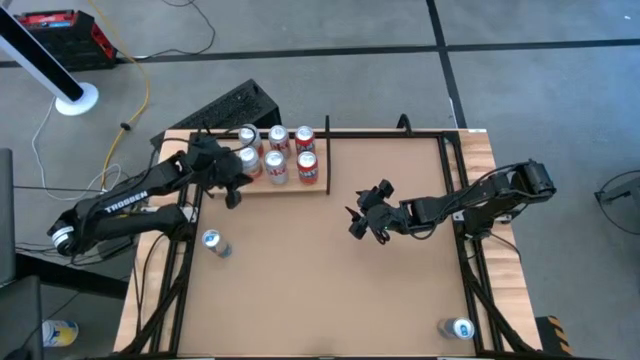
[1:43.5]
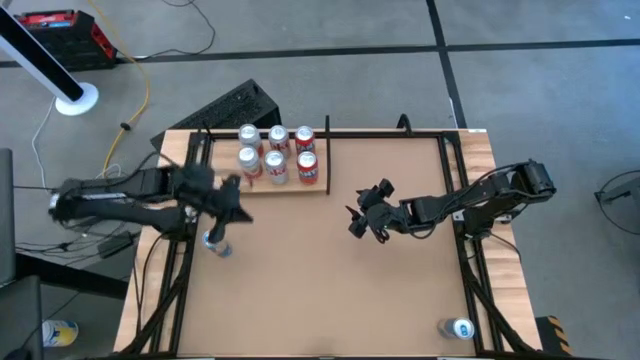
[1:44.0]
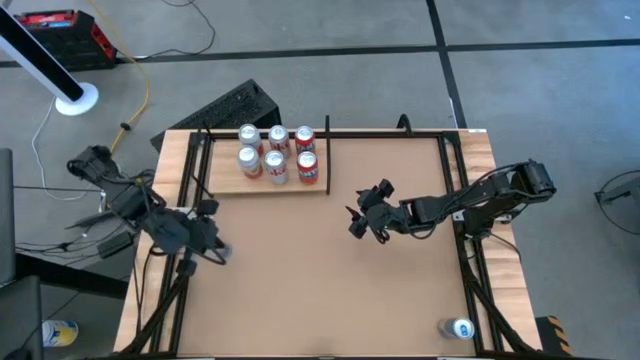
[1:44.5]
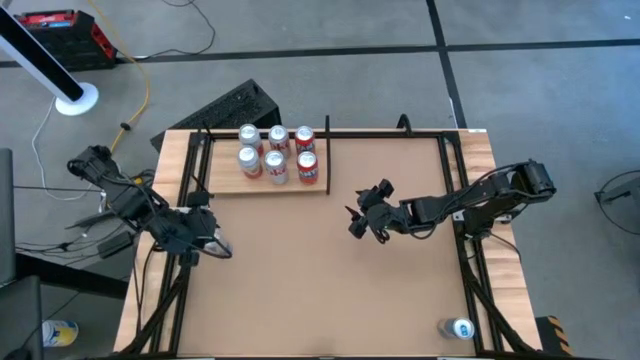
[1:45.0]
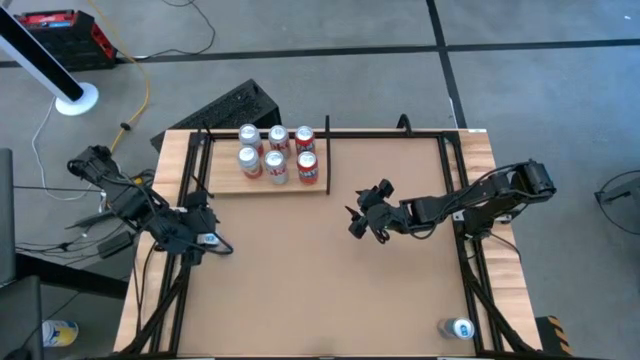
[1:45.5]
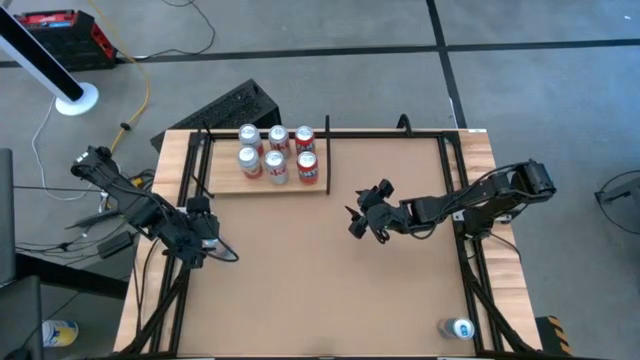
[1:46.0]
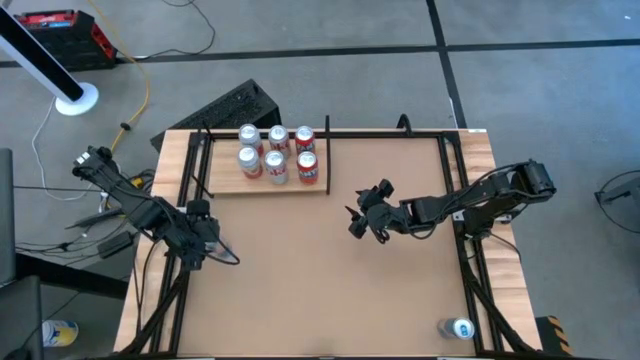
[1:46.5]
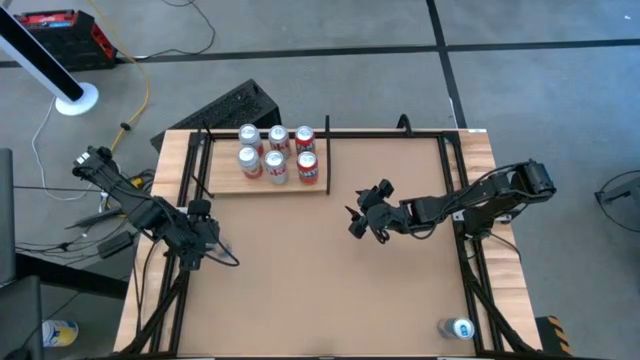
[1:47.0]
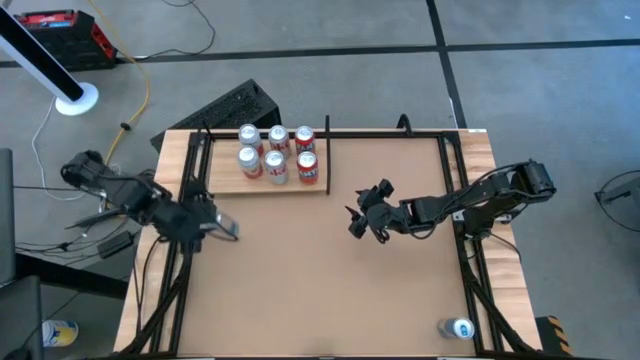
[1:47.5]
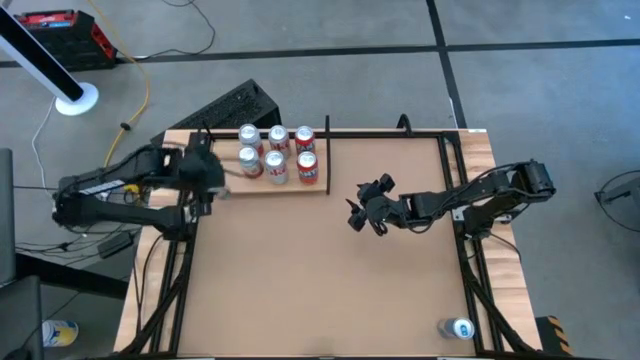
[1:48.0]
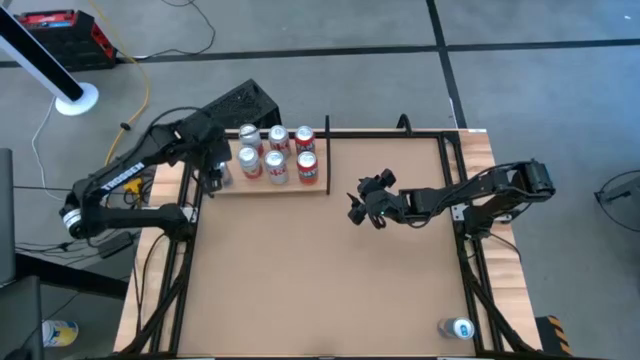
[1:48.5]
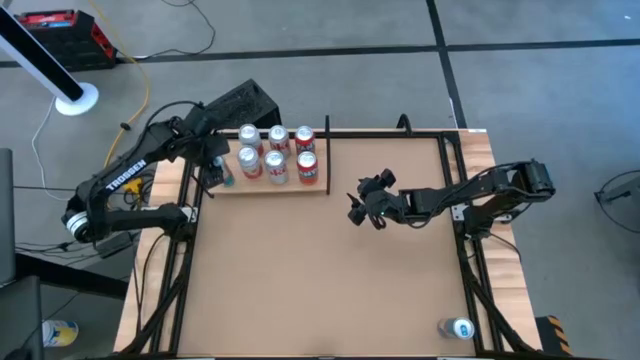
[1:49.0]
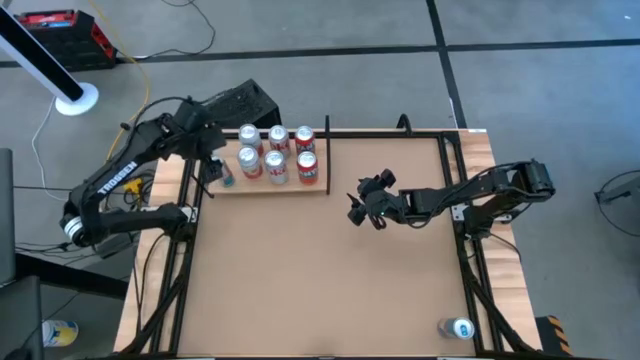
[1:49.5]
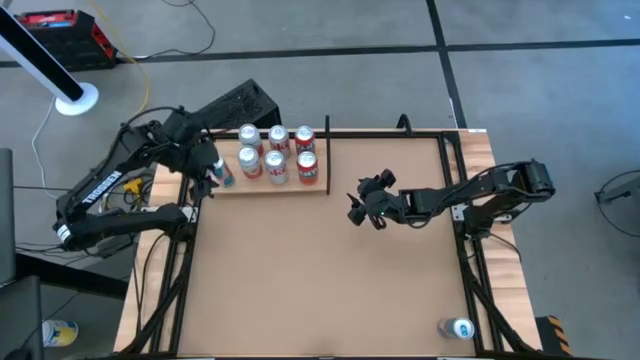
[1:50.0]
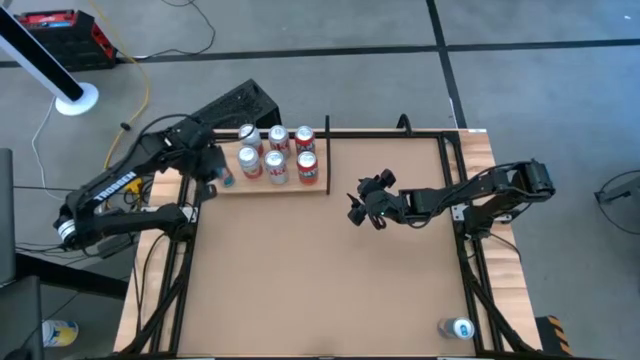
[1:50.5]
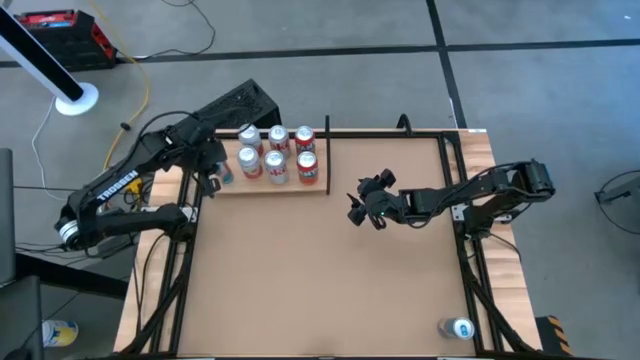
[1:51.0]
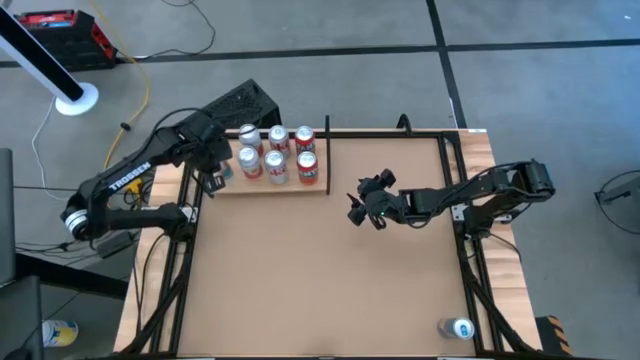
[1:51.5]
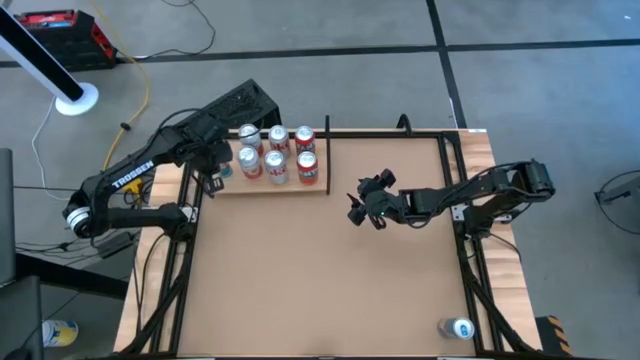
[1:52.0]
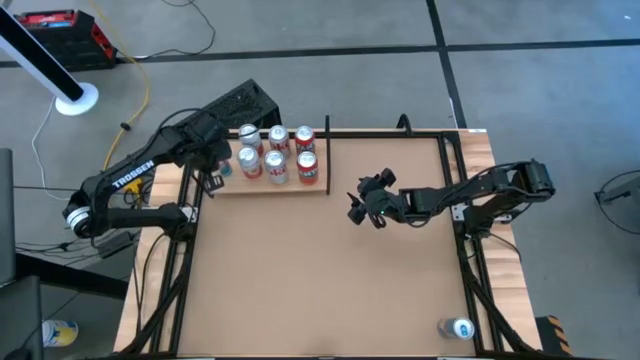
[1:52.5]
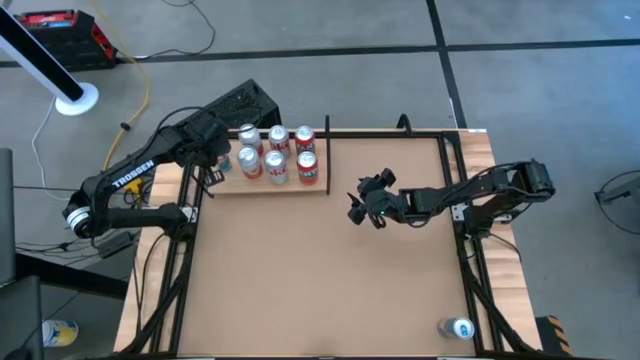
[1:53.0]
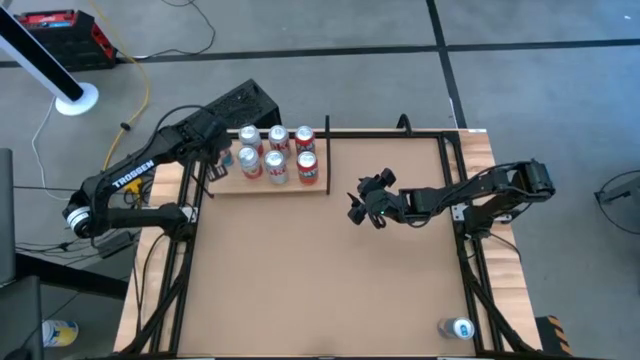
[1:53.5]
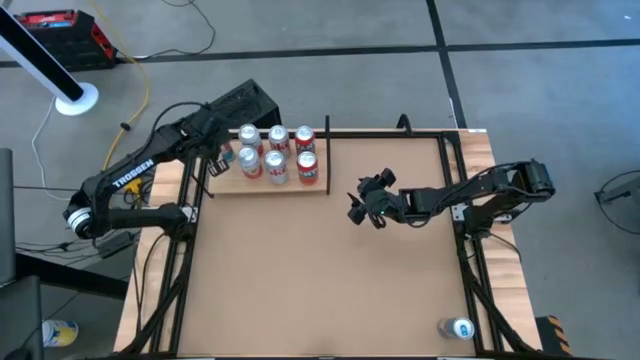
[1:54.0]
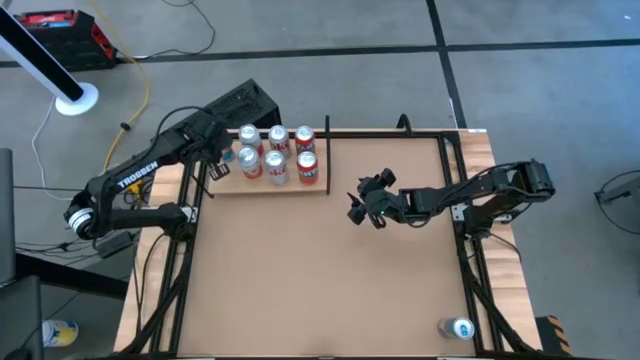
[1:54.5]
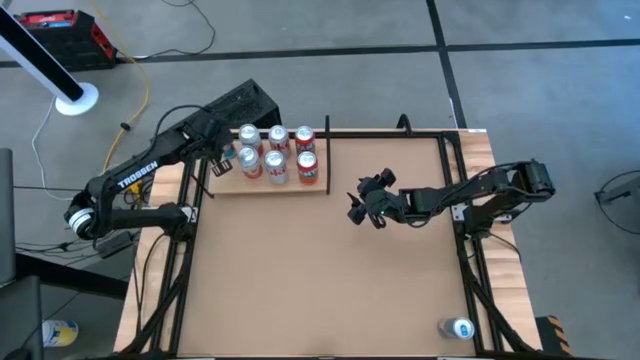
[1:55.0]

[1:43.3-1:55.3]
Task: Place canned beverage on shelf
Put the top blue soda can on the shelf

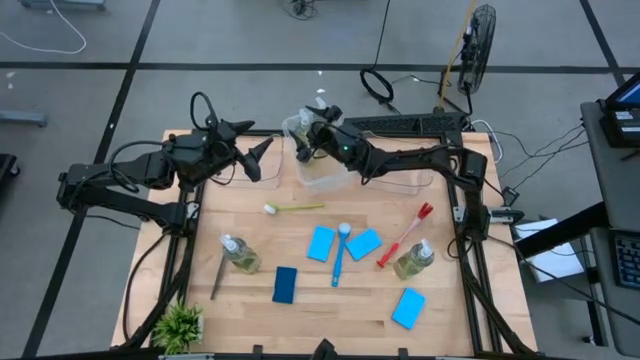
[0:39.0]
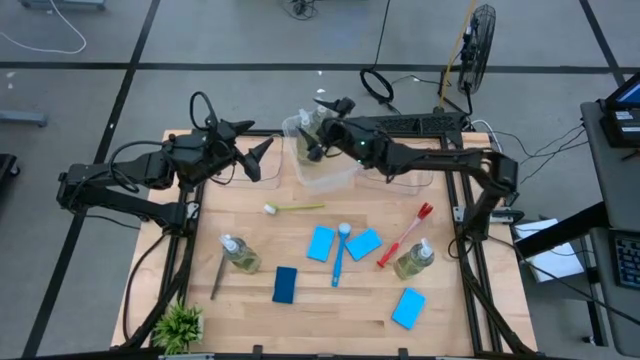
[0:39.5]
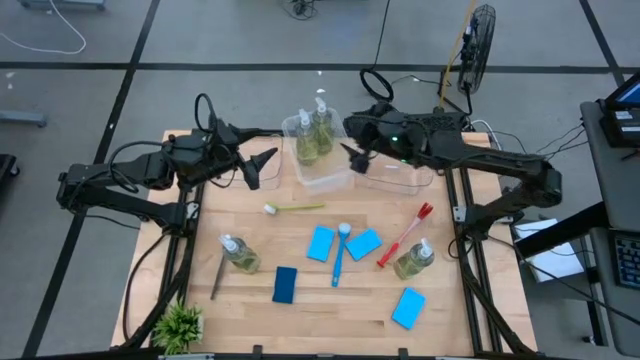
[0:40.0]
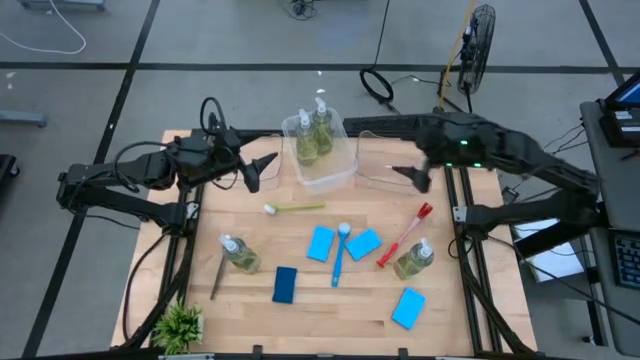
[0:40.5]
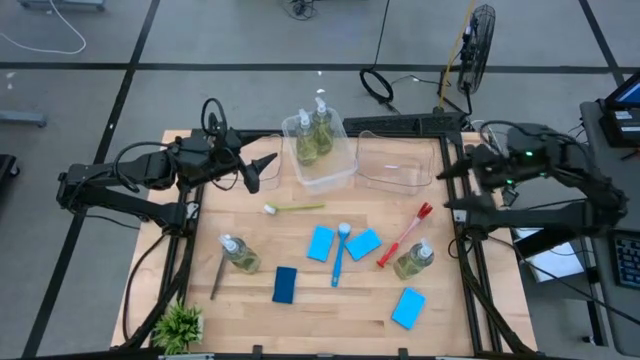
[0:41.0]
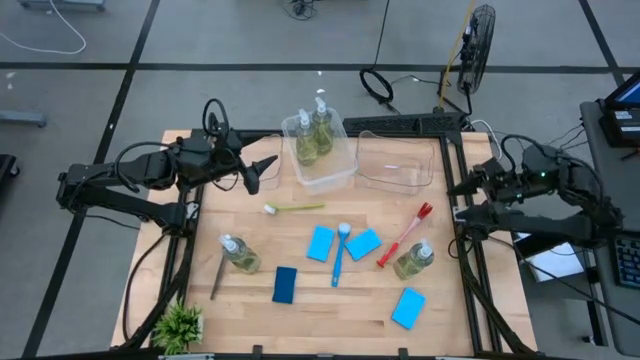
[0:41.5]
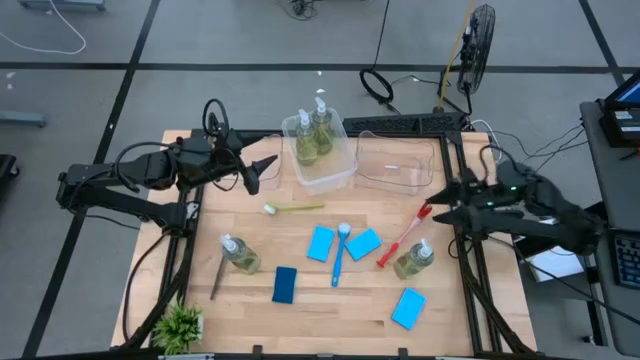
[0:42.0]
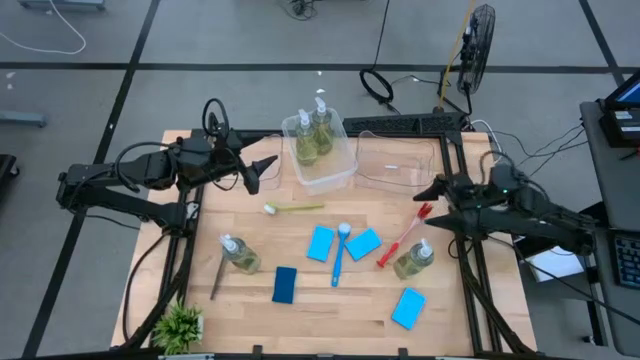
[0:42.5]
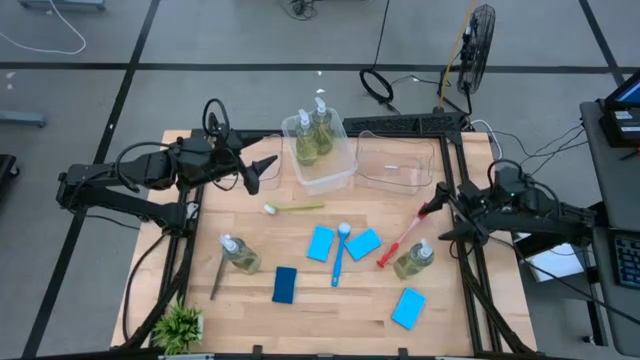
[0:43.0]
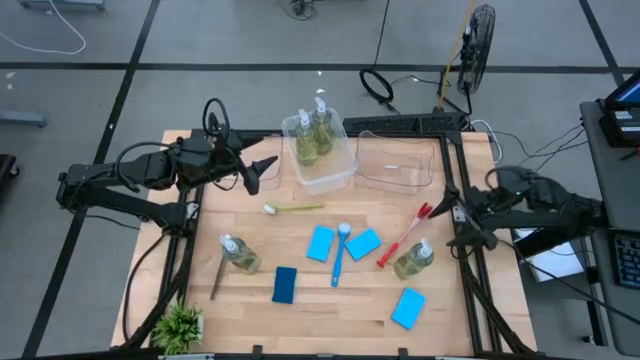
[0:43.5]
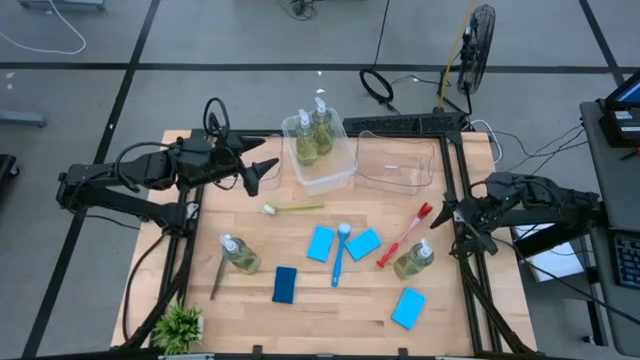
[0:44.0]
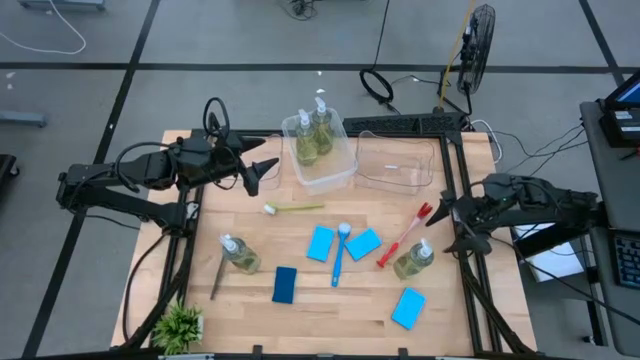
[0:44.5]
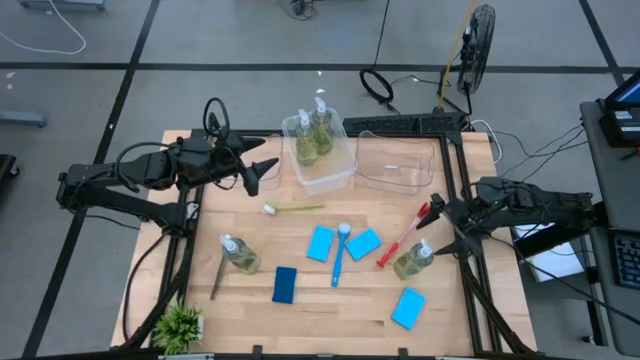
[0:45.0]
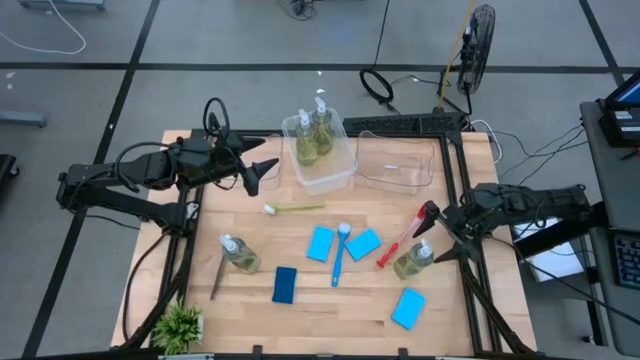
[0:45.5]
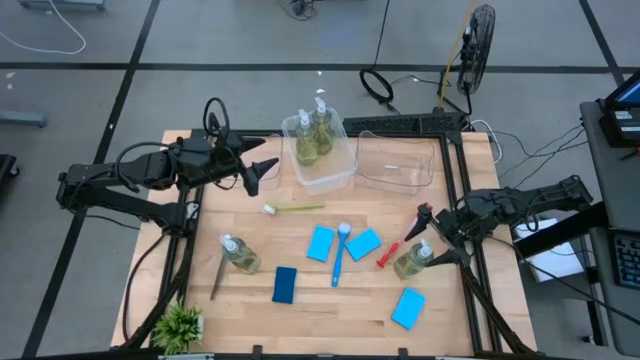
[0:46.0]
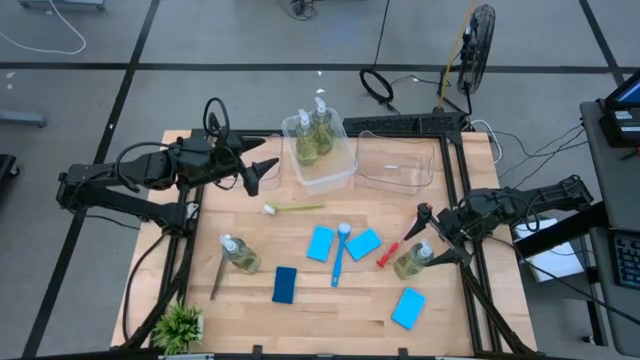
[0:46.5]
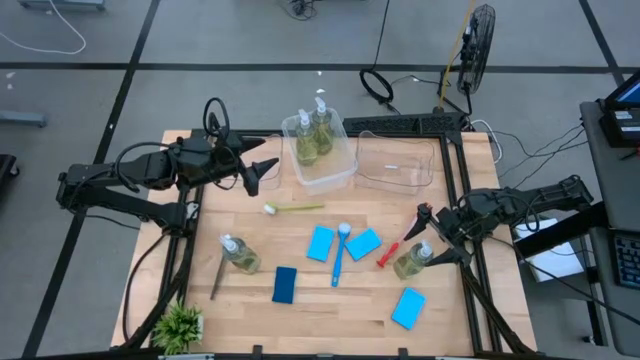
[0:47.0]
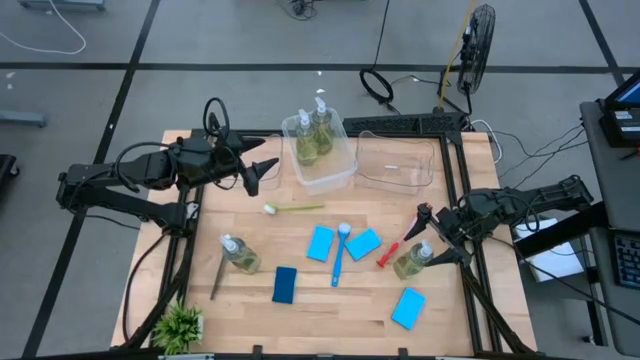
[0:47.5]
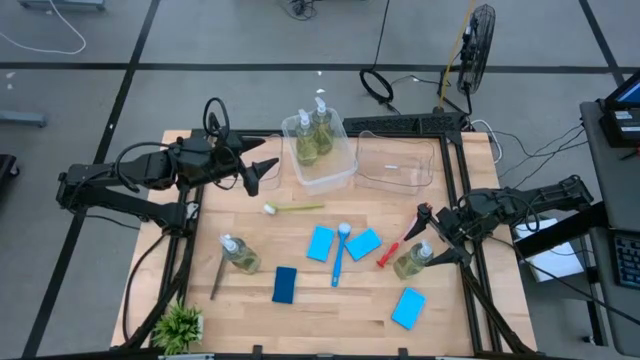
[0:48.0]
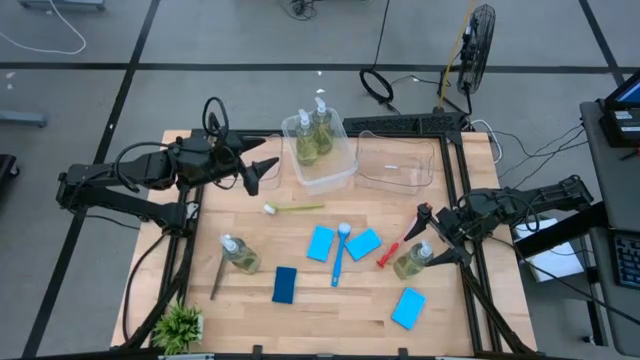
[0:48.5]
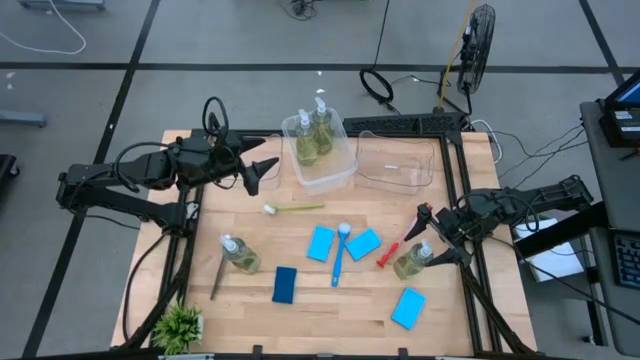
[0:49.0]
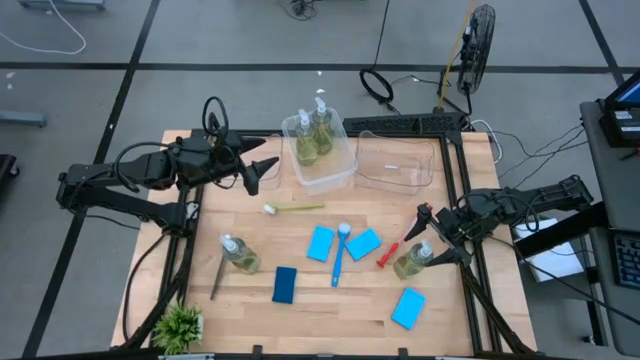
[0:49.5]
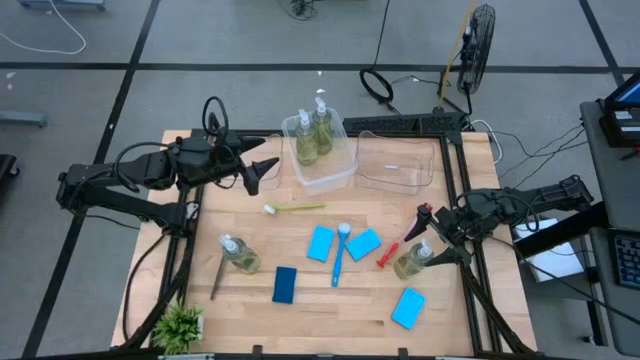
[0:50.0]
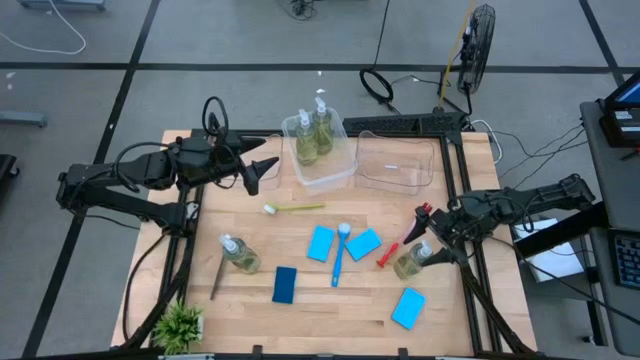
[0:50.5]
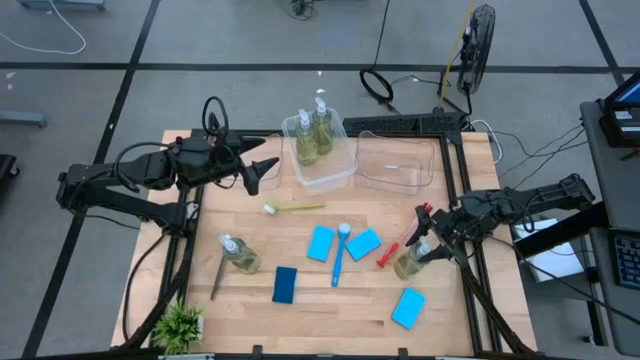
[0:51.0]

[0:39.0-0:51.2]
Task: Pick & Place Kitchen Sink Supplies
Put the yellow dish soap into the white bin
